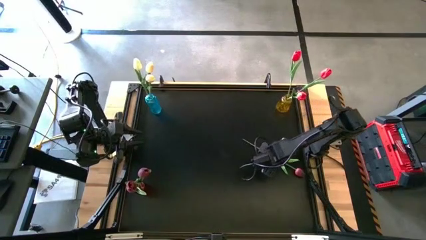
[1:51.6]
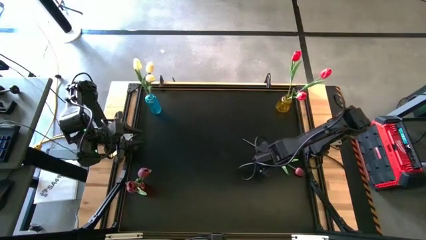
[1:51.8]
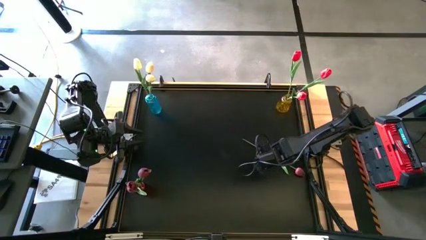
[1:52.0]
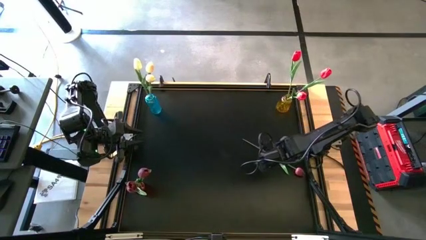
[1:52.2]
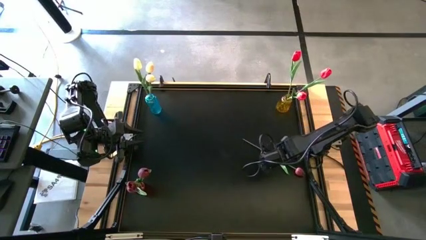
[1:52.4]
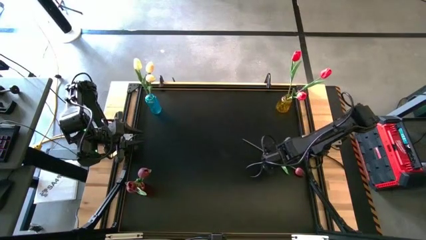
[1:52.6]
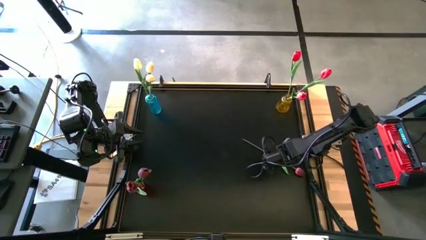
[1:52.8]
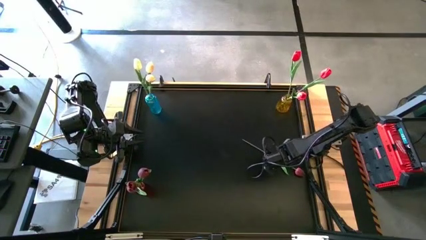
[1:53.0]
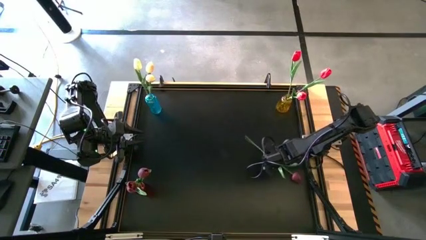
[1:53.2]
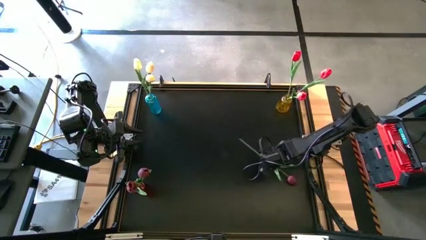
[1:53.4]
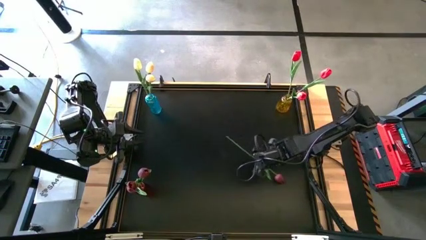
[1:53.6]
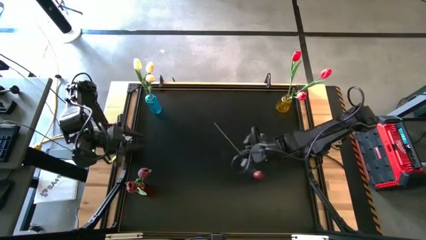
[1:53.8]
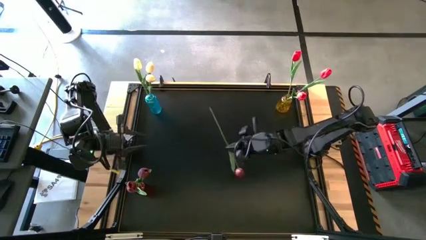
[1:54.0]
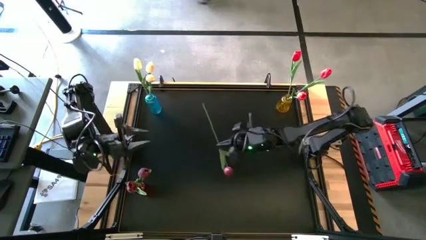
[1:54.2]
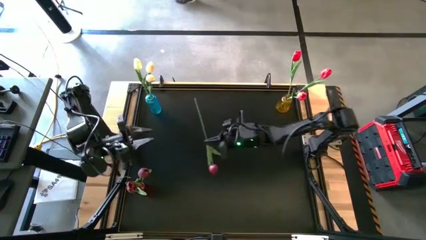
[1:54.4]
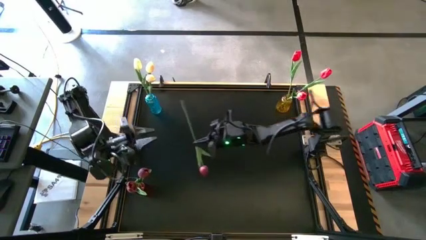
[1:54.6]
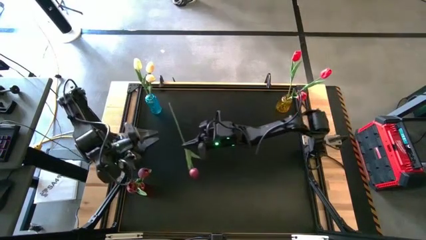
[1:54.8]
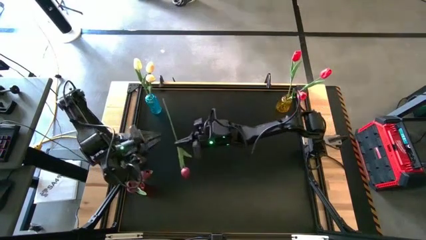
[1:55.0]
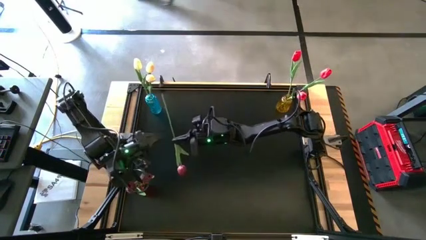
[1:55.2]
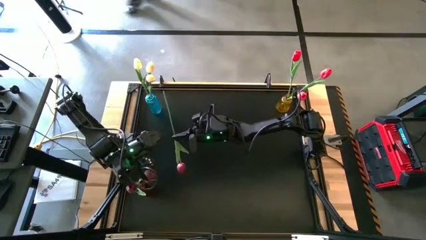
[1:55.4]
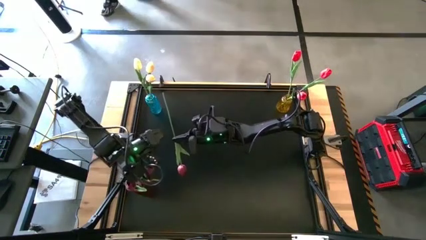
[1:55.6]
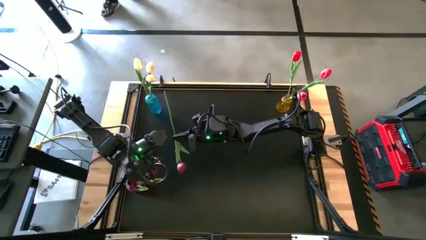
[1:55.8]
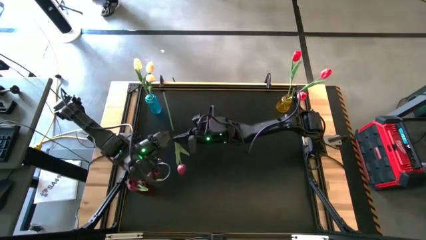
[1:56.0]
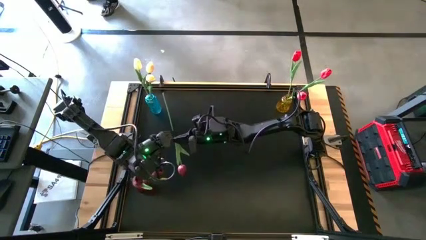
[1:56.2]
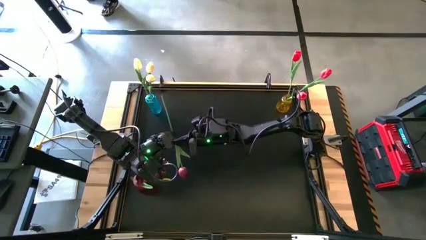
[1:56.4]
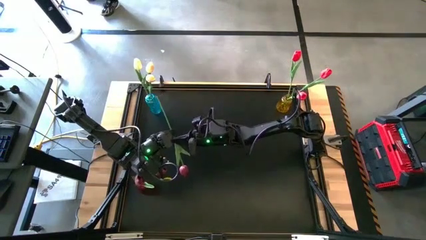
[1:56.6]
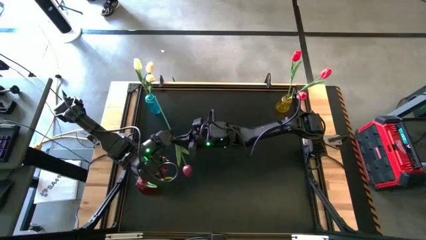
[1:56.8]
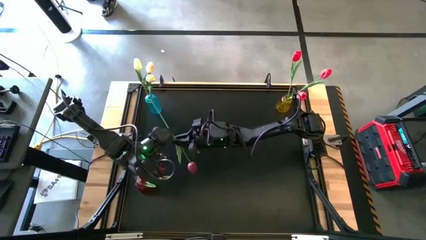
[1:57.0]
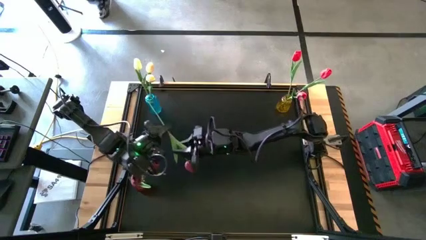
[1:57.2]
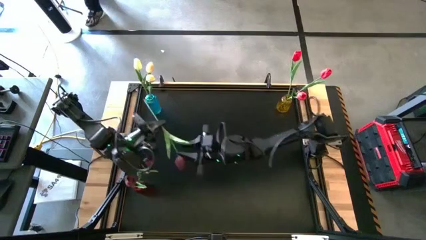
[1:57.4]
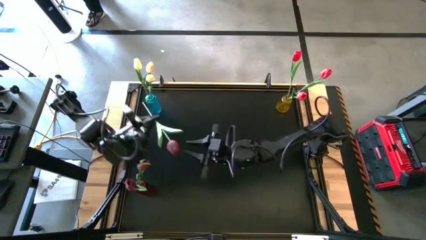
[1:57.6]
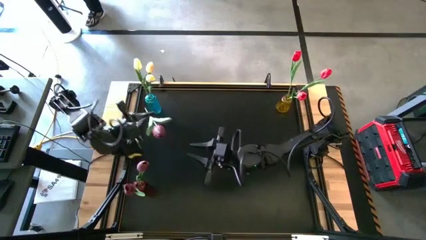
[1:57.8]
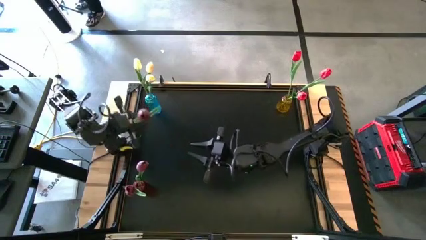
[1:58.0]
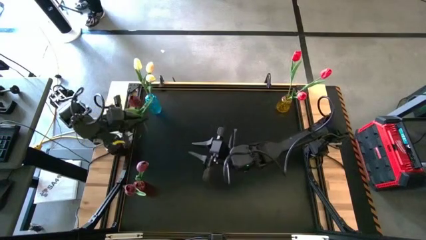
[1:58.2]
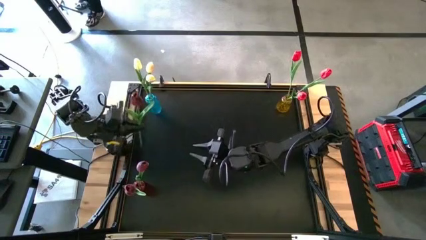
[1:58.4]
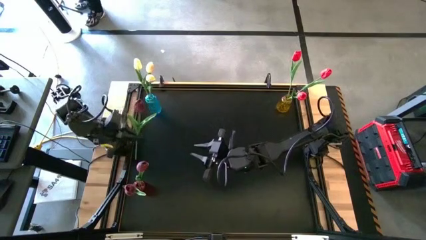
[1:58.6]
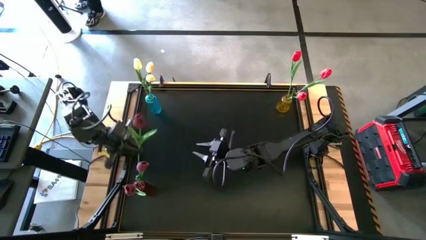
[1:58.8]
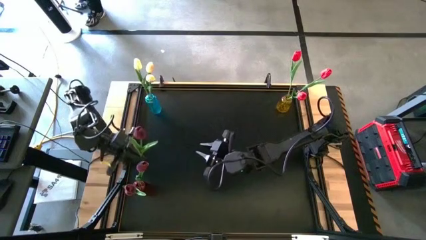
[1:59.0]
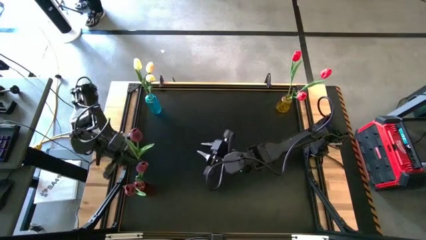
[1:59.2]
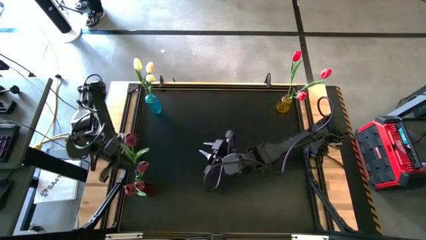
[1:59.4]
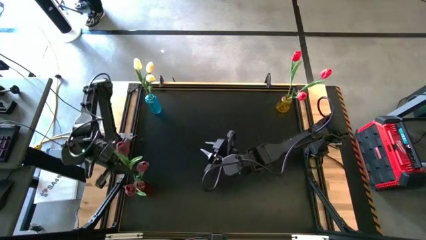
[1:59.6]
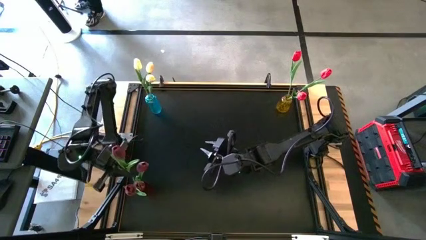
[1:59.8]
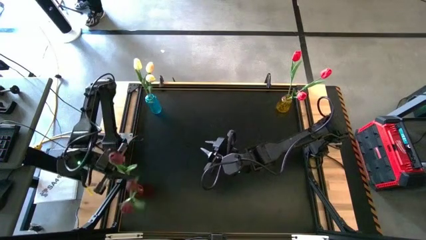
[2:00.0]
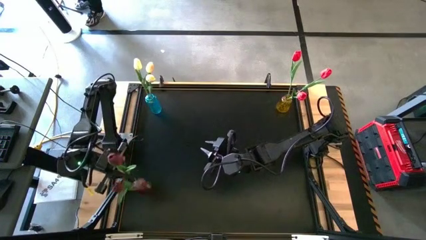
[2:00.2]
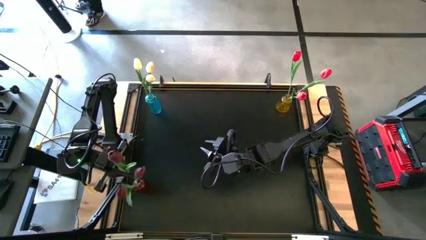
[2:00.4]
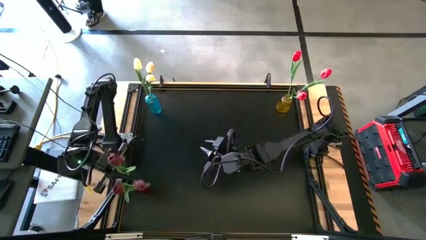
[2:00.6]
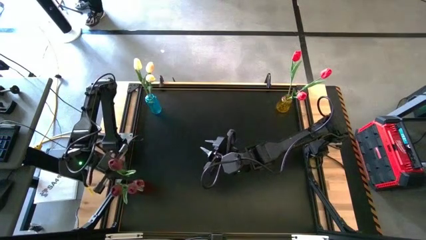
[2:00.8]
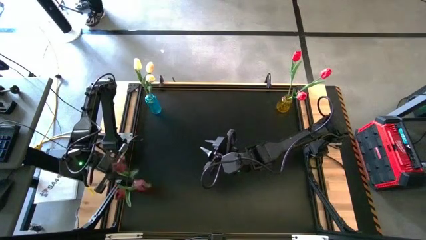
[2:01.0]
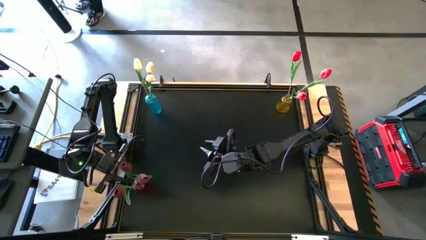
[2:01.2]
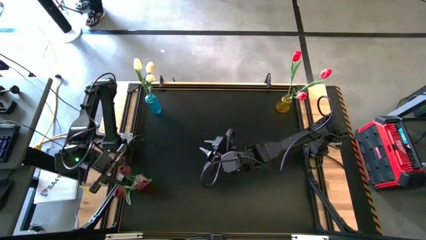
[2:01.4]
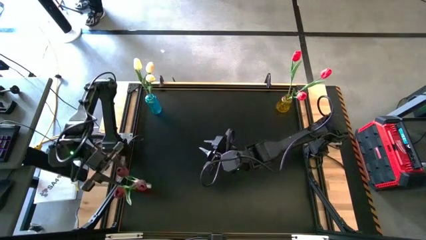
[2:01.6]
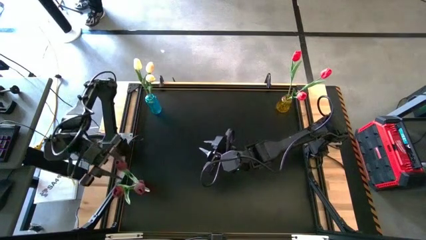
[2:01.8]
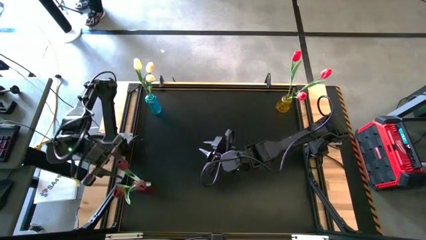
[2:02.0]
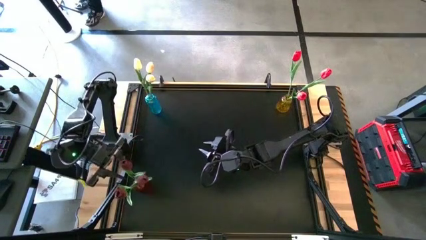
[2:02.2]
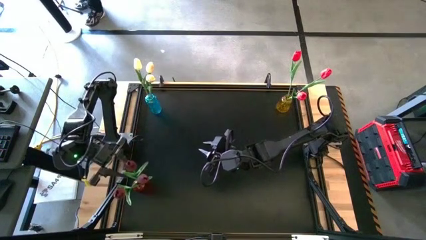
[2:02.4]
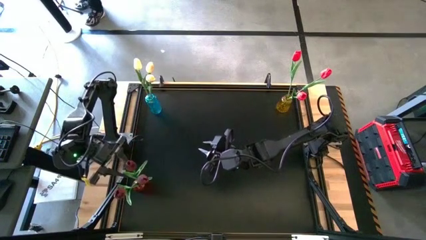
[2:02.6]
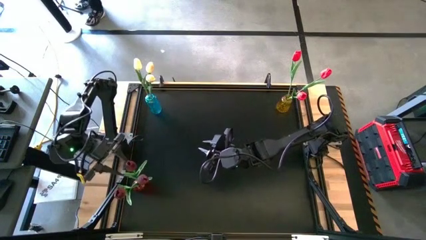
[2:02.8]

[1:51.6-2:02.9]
Task: Sort flowers into vase by color
Put the dark red tulip into the red vase
